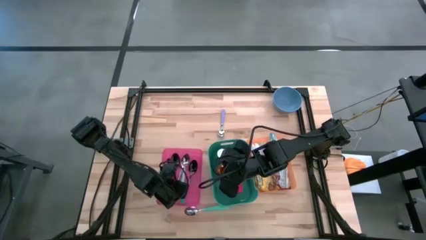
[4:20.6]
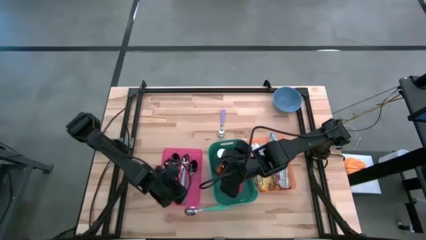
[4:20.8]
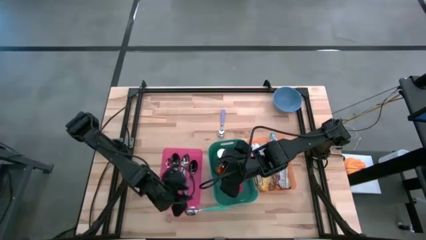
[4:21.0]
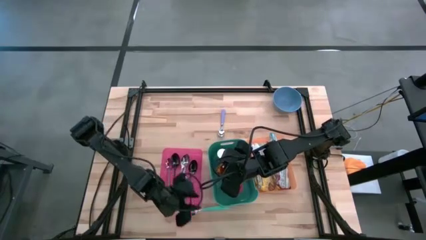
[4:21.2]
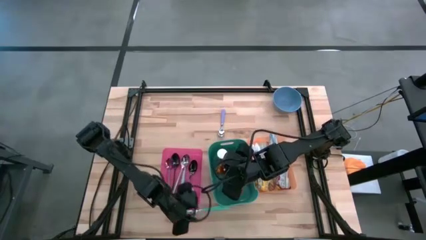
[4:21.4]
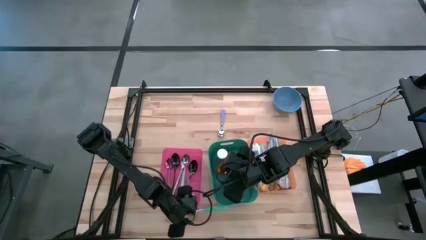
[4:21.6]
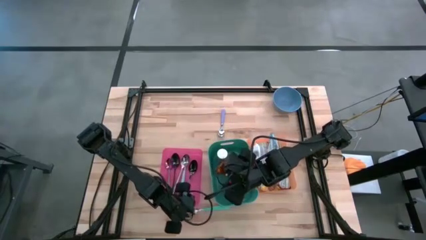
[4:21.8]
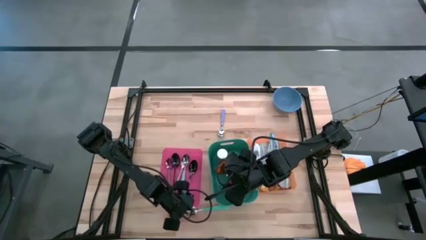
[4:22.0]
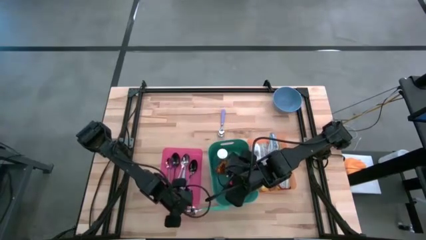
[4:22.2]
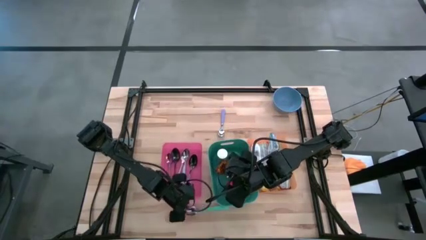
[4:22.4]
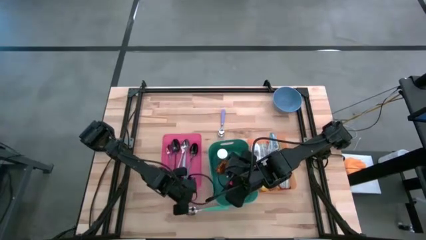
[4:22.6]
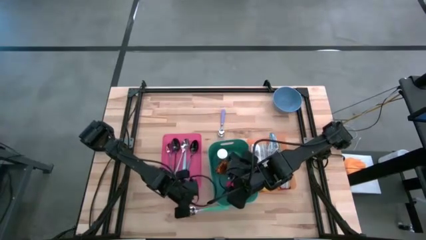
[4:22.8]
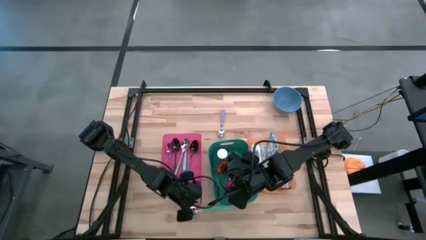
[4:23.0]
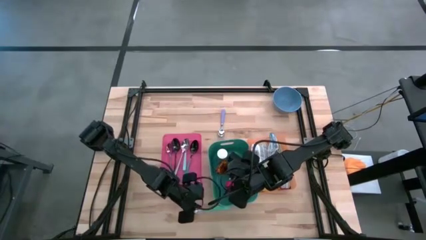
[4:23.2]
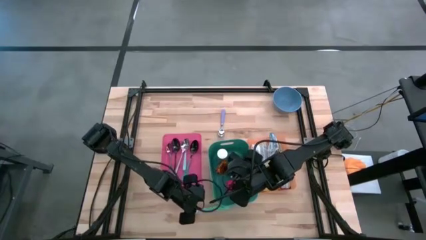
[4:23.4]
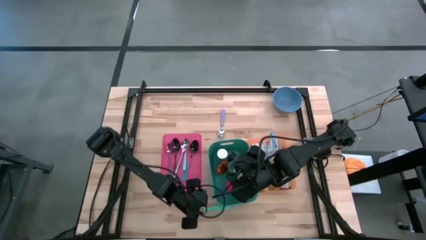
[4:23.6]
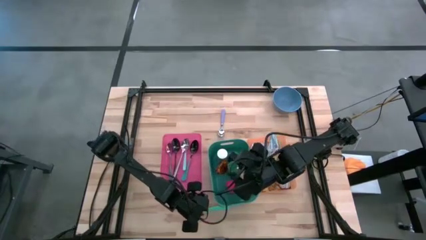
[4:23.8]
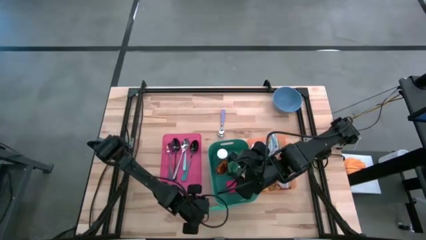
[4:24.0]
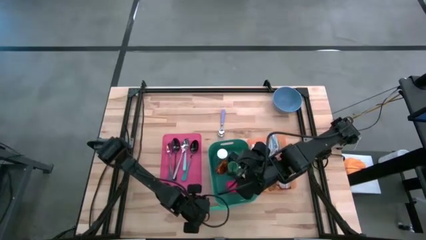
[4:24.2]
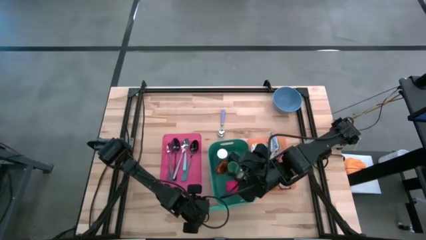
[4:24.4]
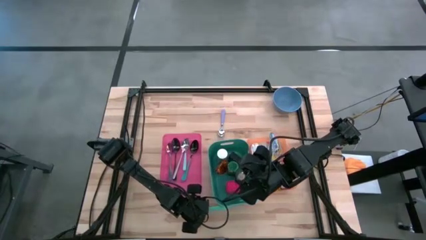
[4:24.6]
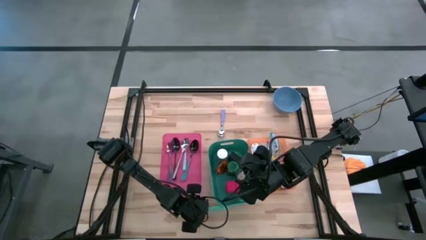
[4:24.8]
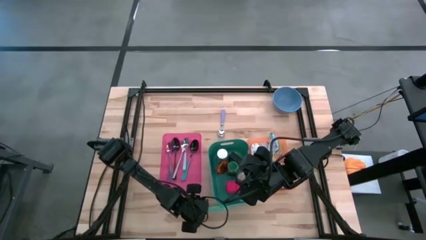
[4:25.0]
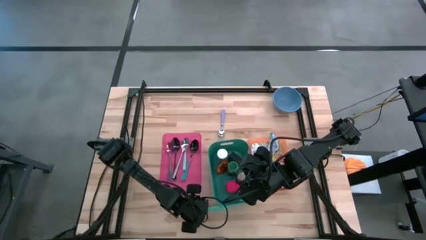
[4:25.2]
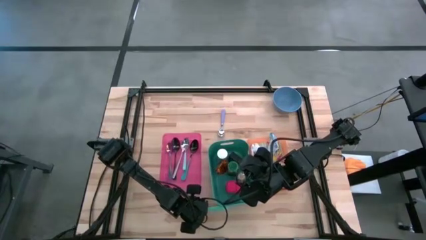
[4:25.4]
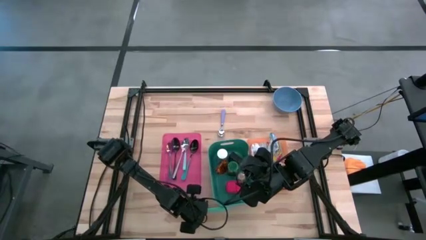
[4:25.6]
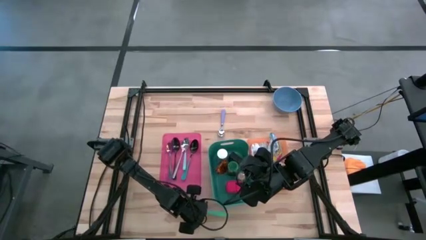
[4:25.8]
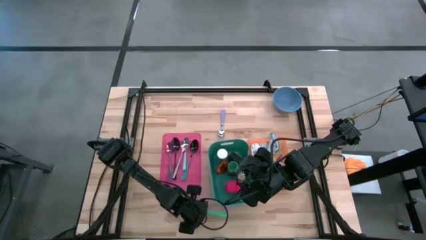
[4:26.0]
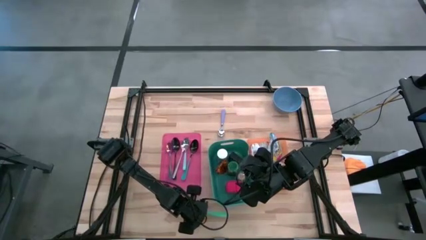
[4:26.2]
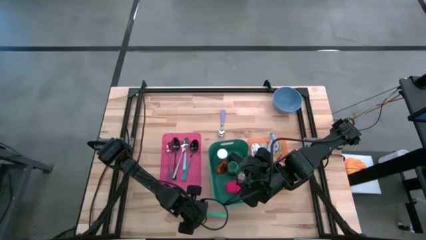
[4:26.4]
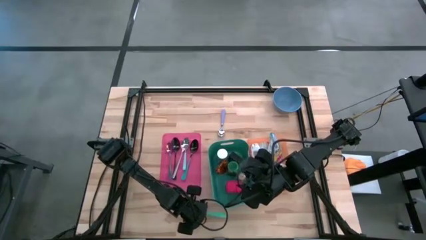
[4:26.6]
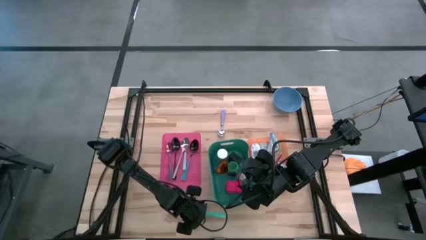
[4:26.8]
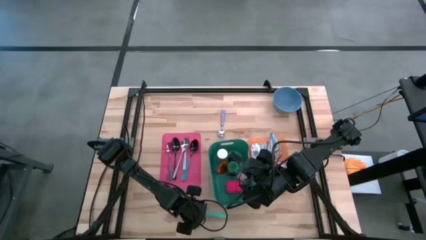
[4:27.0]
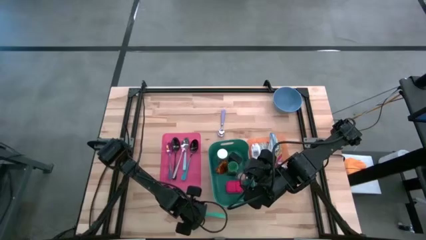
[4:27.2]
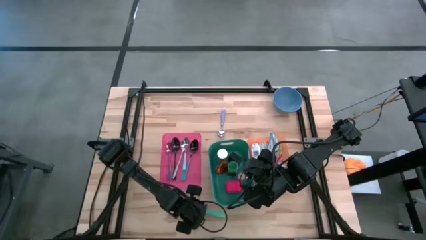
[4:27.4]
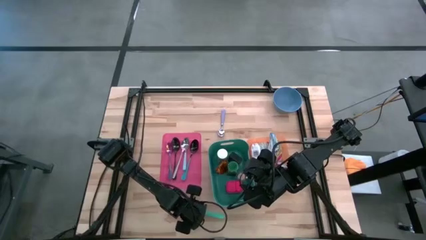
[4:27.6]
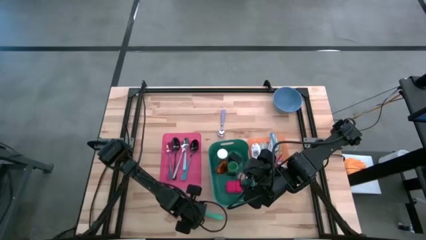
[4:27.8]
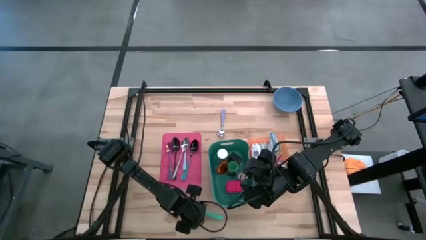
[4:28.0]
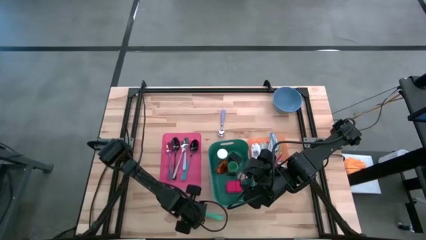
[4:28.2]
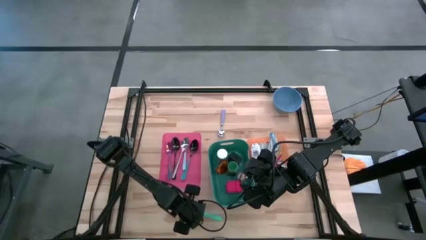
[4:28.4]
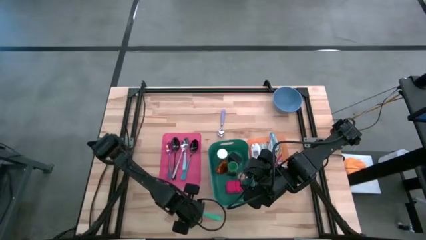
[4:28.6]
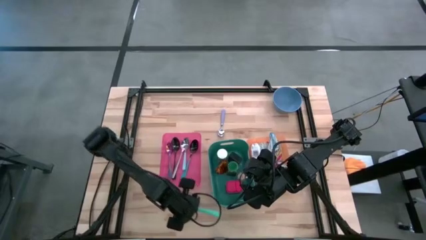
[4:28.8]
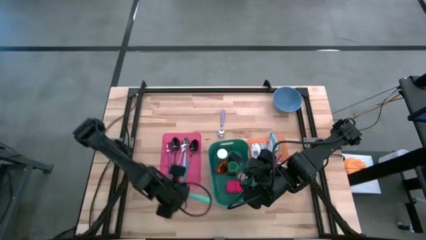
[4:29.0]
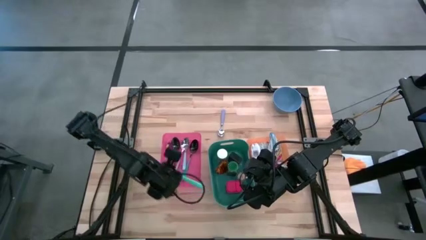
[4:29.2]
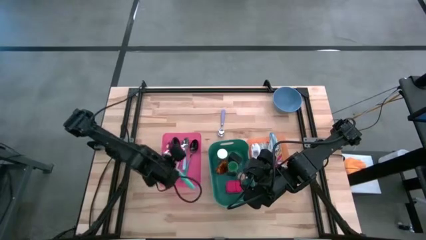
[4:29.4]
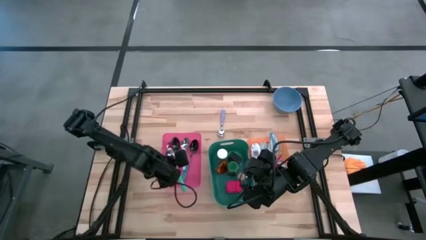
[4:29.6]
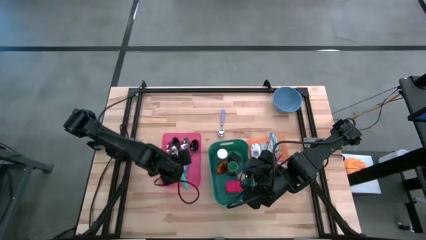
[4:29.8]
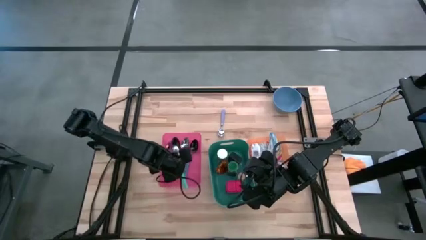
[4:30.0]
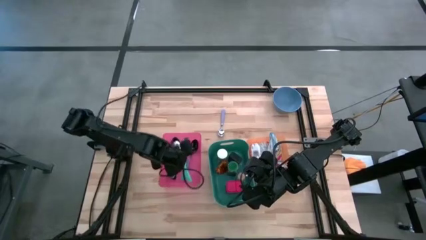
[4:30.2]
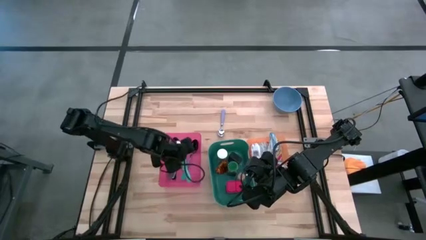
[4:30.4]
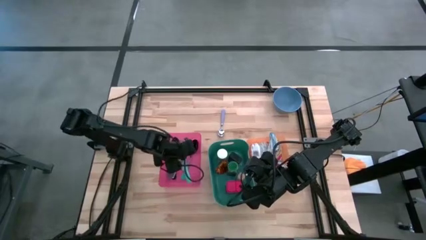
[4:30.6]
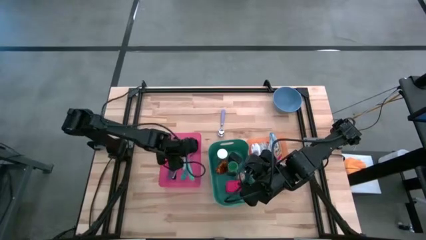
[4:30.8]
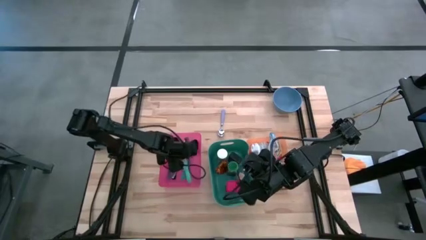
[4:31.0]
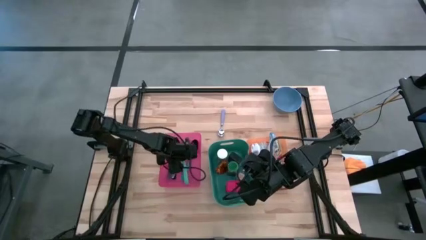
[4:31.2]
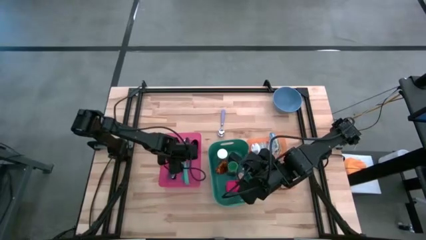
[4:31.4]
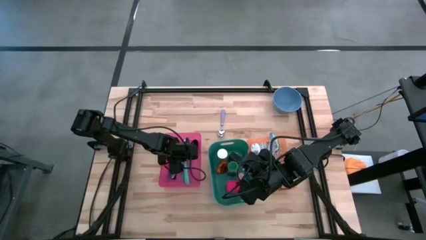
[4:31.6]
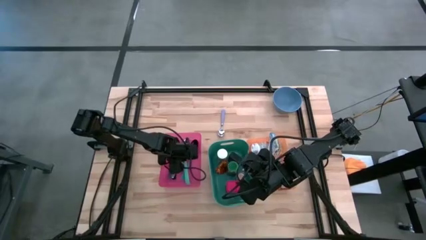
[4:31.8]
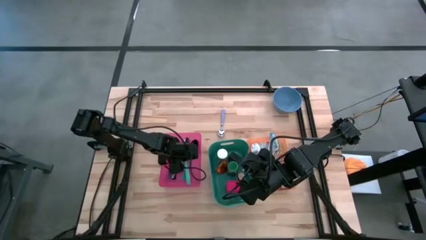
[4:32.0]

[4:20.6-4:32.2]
Put the light green spoon into the pink bin
